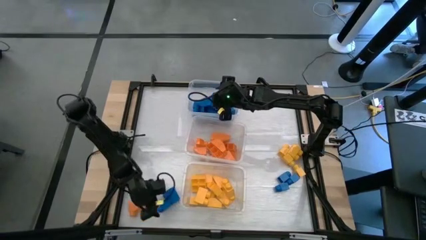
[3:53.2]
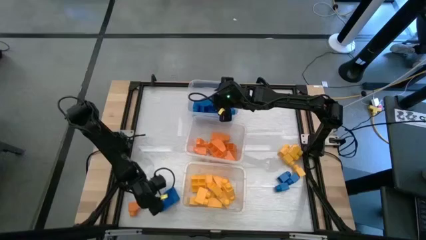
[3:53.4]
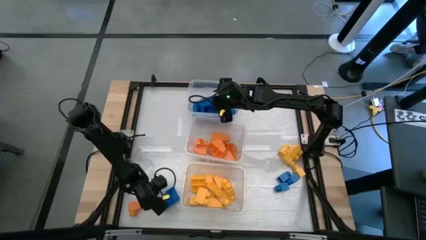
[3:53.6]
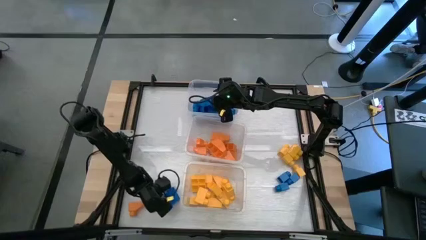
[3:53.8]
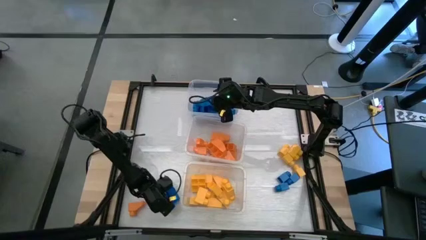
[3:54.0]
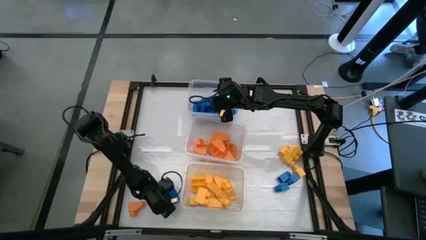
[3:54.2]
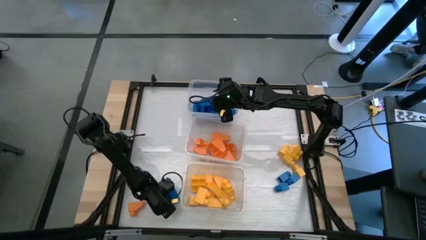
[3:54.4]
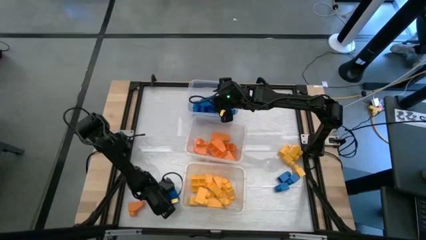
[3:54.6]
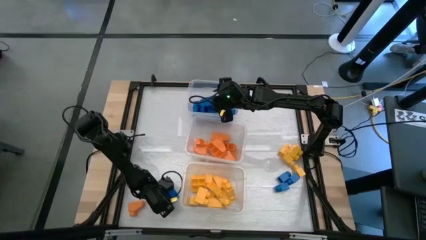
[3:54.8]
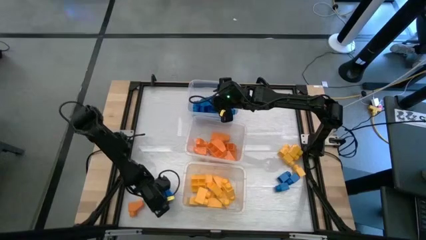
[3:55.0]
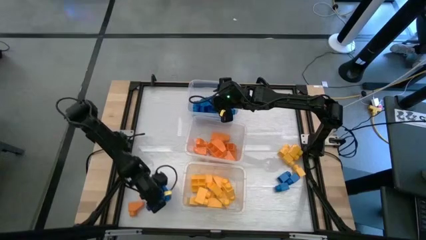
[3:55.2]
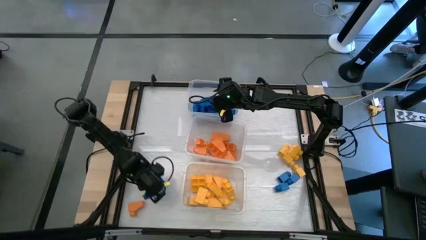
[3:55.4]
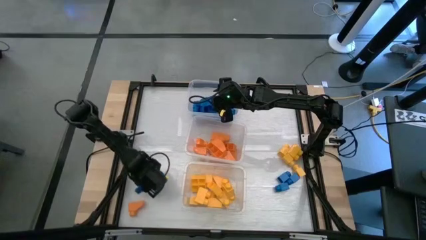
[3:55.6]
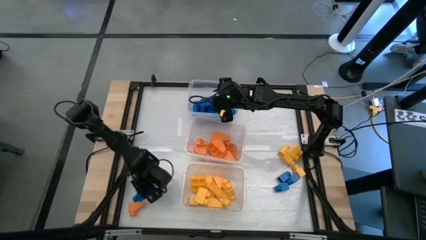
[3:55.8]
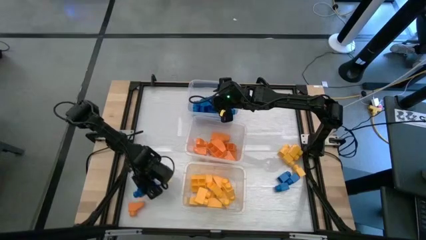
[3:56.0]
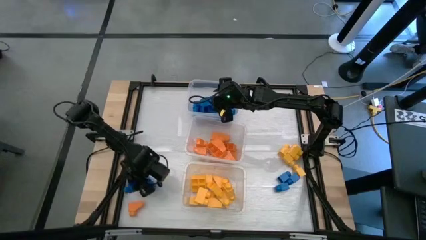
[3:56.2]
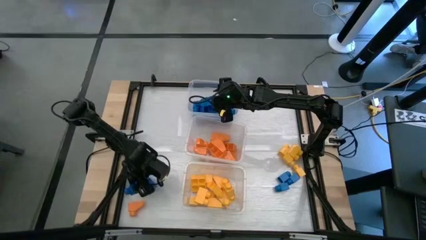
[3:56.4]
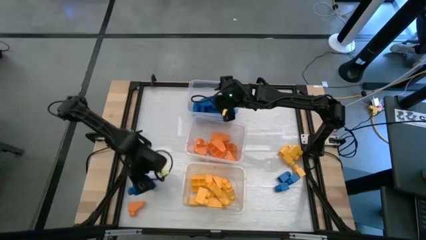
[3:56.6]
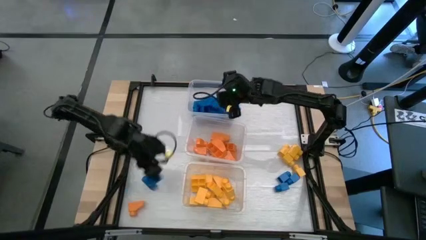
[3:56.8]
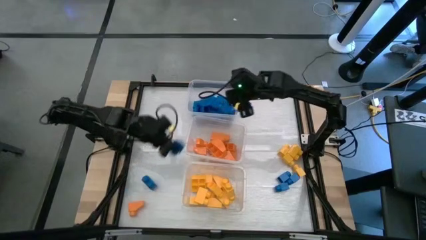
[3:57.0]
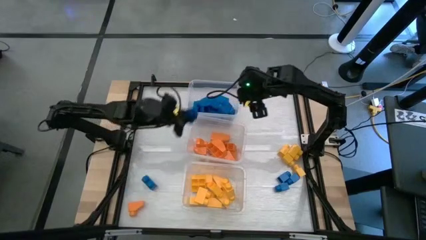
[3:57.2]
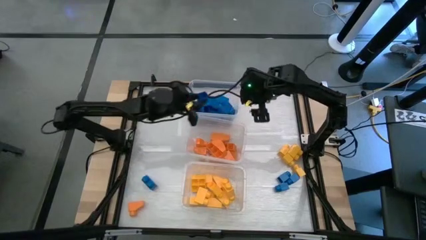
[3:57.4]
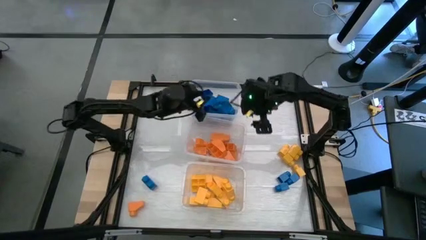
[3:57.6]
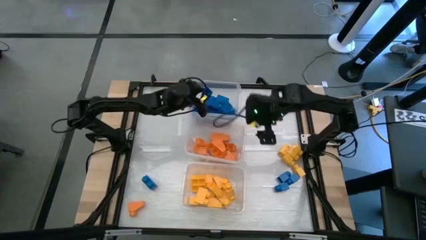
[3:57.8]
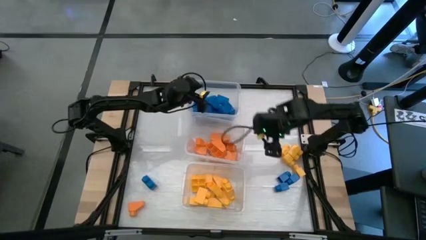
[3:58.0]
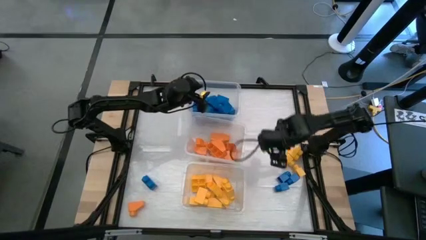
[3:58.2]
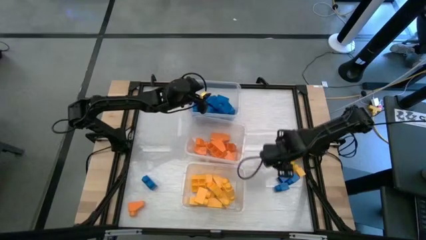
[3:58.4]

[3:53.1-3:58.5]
Task: Sort blocks
Put the blue game piece into the top transparent bin

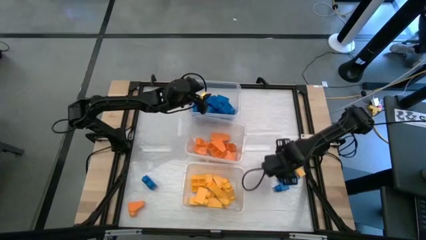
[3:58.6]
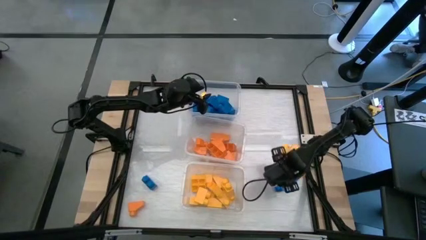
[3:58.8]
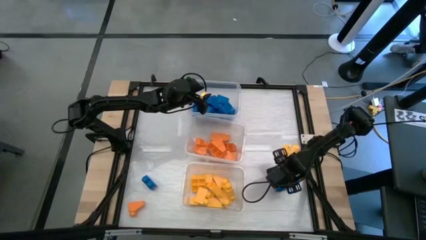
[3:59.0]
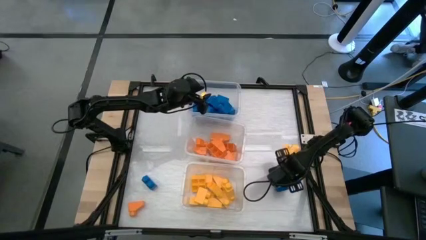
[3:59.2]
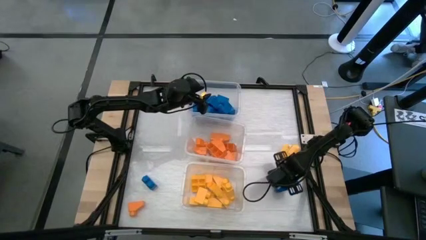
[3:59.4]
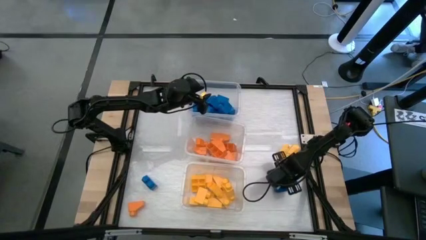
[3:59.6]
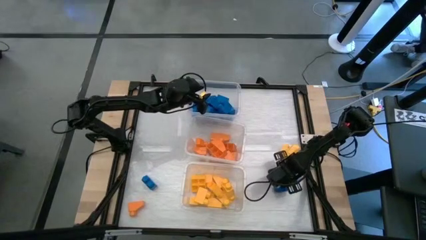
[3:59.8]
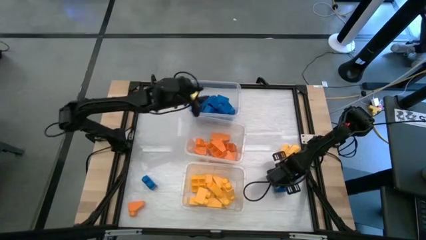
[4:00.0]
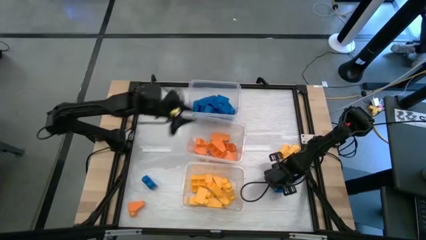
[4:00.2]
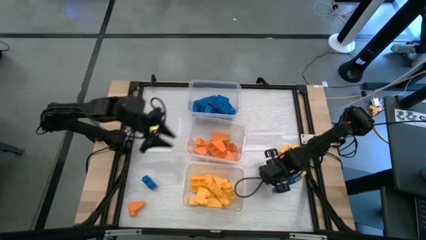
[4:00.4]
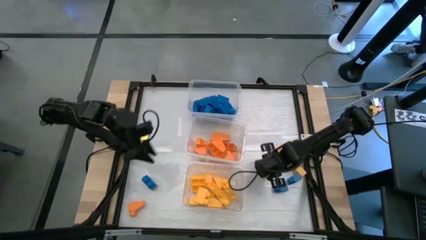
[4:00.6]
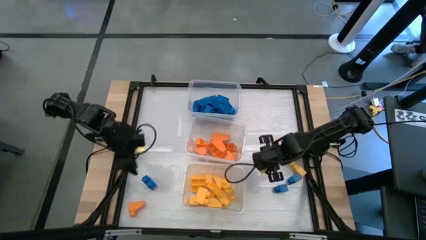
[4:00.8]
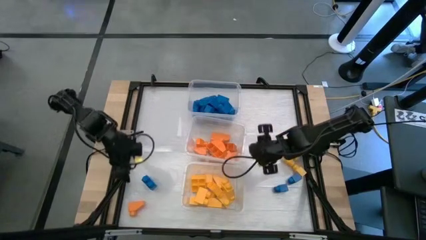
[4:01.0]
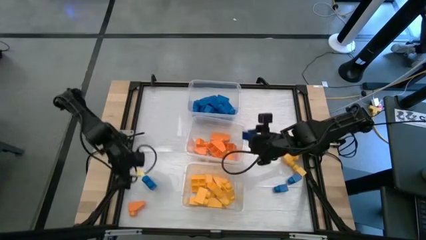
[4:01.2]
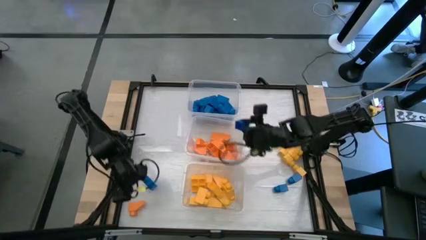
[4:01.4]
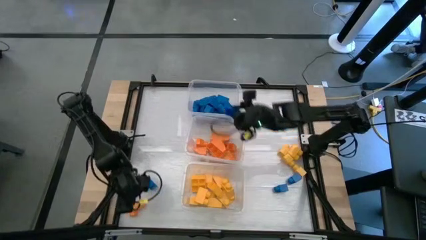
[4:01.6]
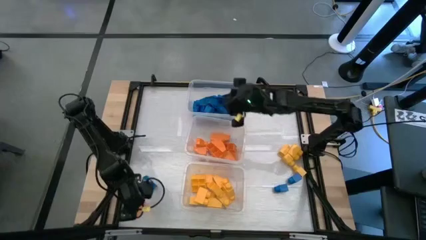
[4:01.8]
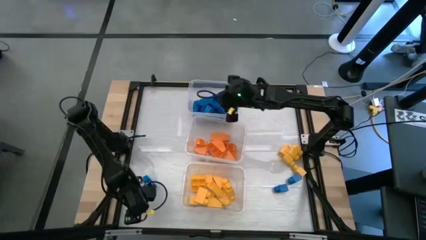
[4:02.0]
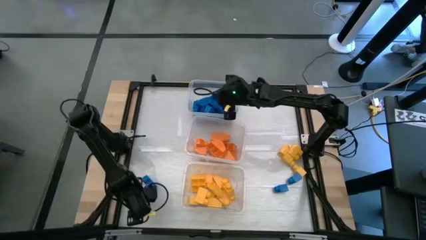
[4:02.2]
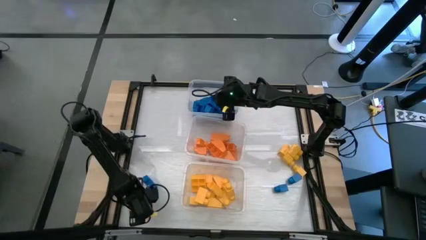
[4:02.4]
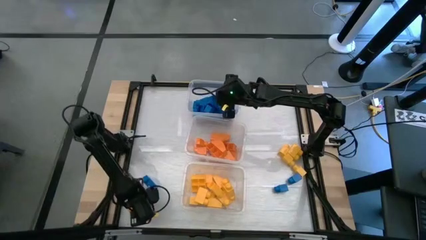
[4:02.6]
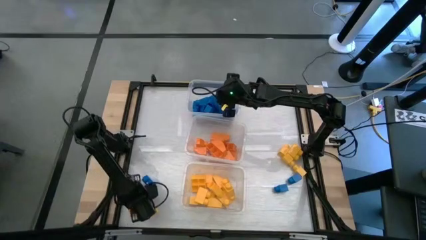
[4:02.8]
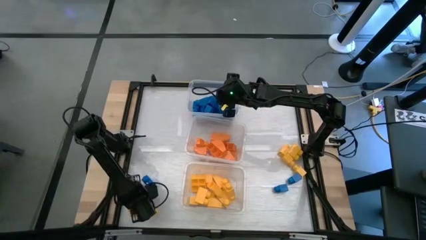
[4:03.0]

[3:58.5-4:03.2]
Put the blue game piece into the top transparent bin

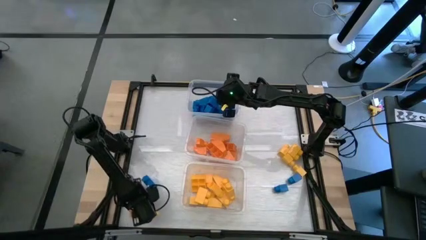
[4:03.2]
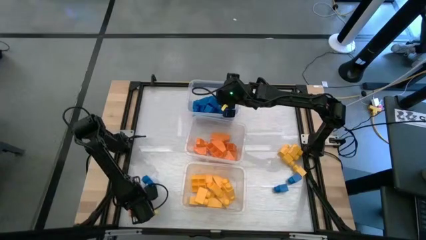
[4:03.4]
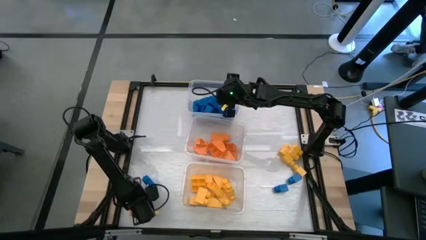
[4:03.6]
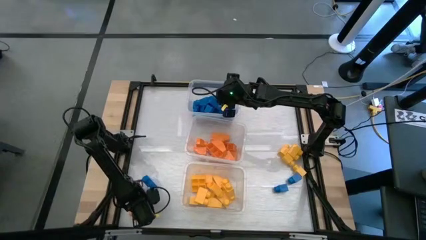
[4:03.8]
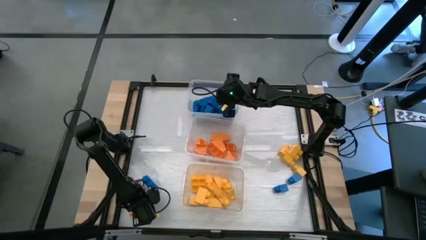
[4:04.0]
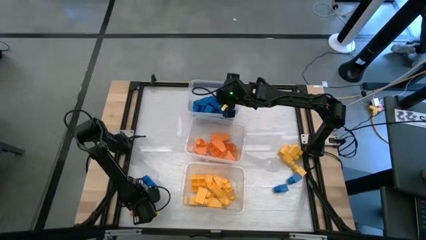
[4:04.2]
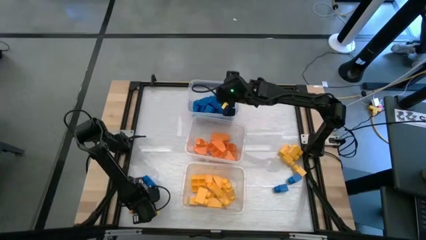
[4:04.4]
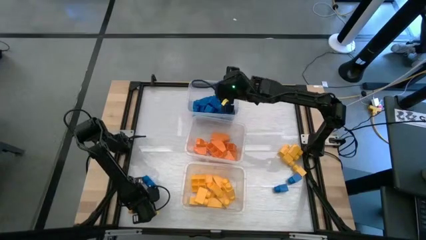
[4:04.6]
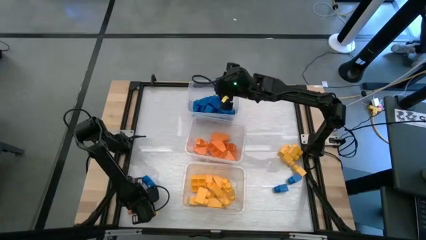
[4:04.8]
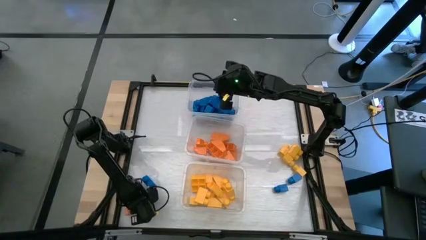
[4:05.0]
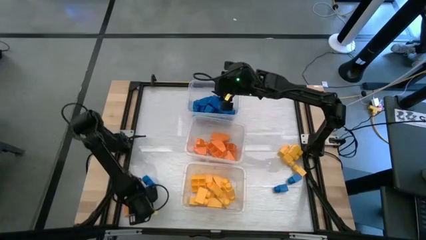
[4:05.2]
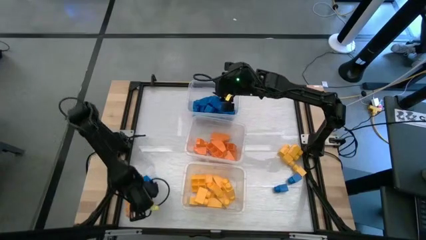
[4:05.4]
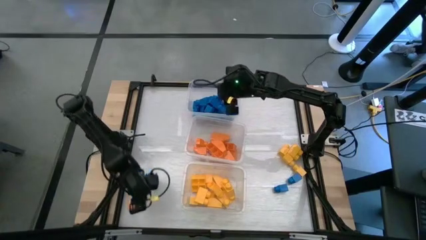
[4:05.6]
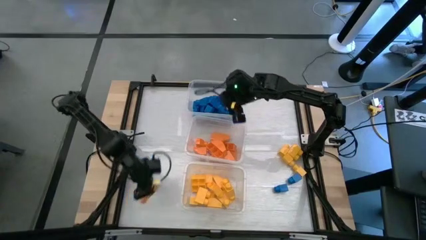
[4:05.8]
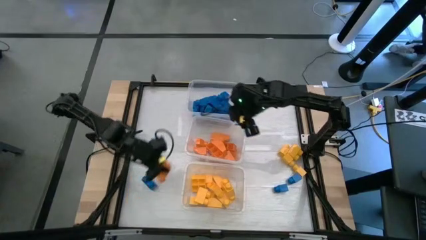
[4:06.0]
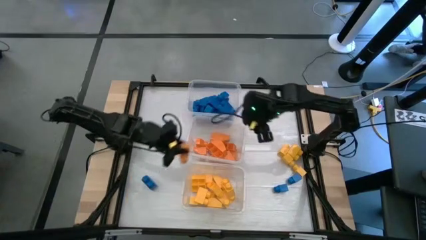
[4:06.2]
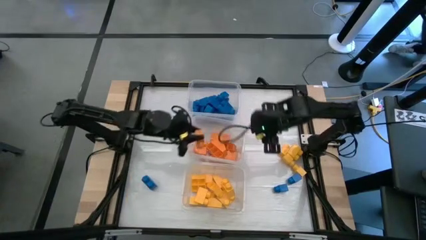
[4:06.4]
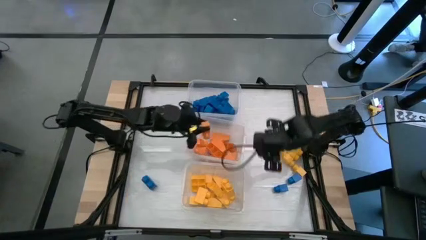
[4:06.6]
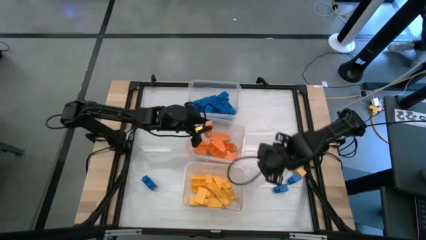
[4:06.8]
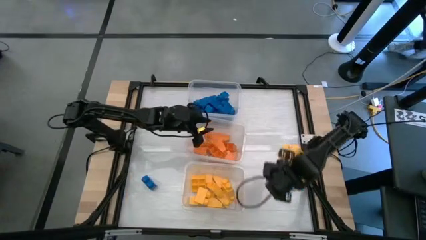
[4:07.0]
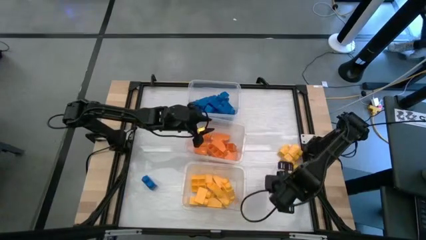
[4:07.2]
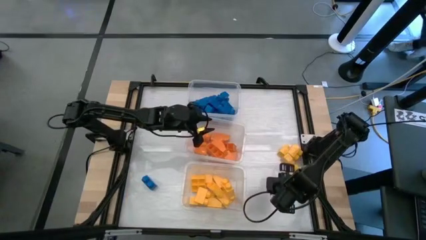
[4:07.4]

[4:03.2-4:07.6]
Put the orange game piece into the middle transparent bin

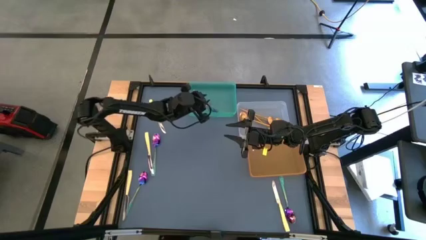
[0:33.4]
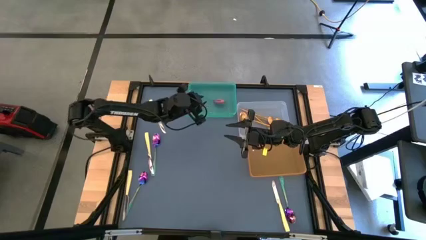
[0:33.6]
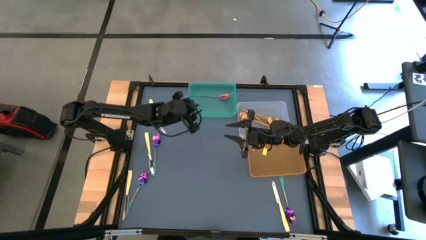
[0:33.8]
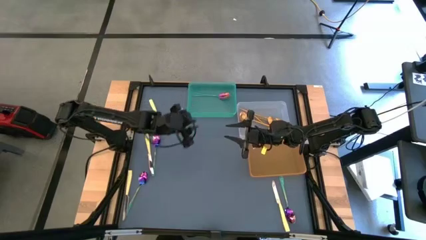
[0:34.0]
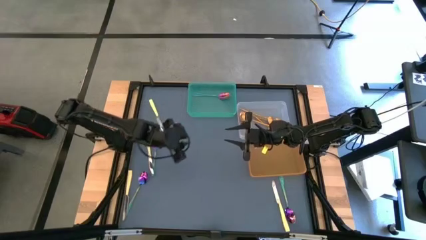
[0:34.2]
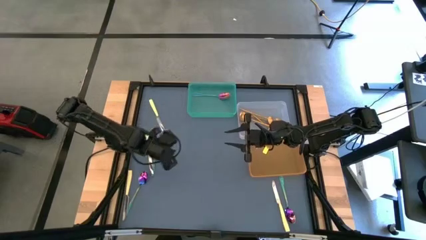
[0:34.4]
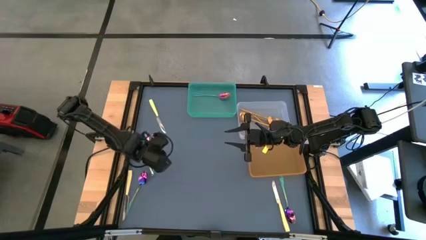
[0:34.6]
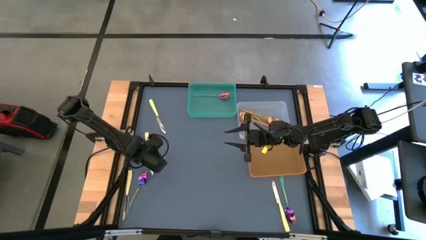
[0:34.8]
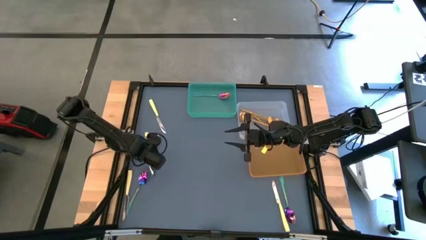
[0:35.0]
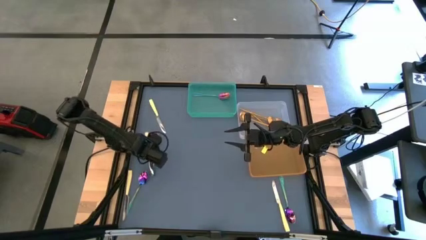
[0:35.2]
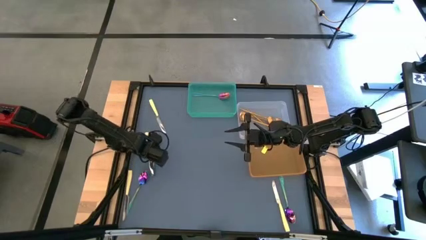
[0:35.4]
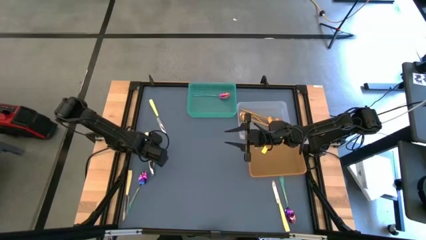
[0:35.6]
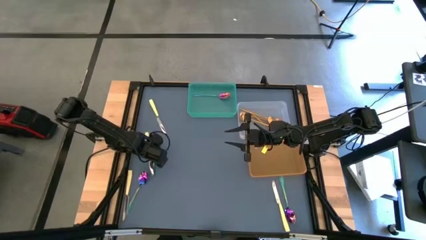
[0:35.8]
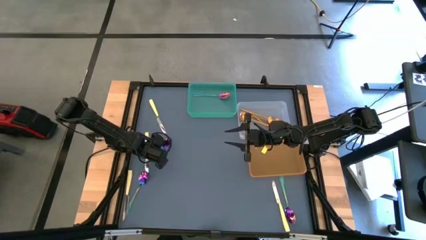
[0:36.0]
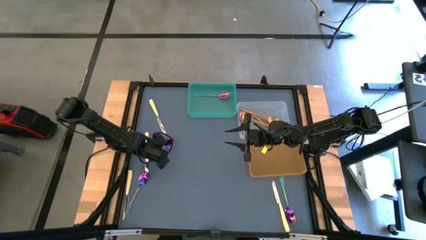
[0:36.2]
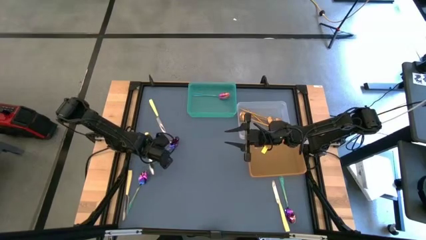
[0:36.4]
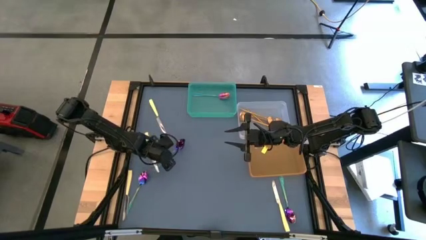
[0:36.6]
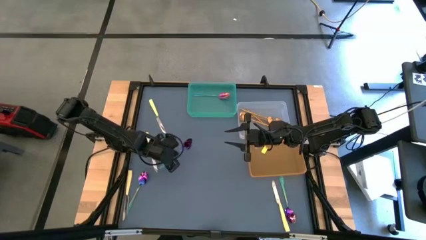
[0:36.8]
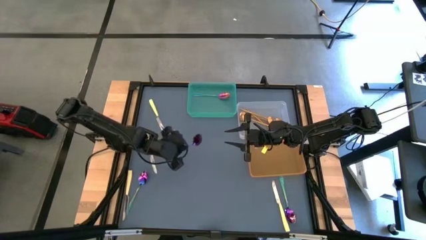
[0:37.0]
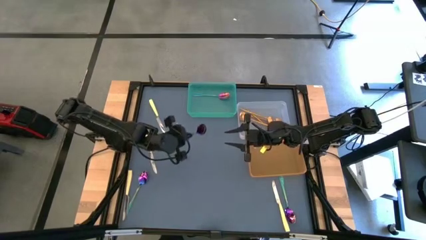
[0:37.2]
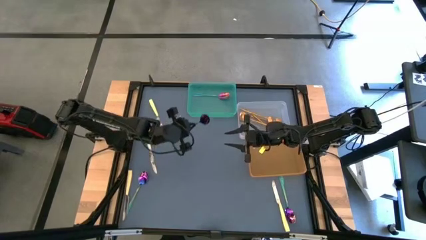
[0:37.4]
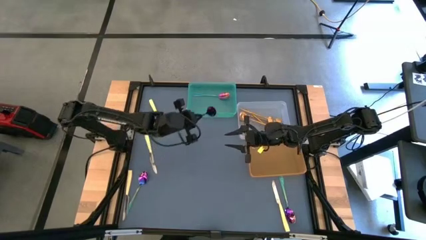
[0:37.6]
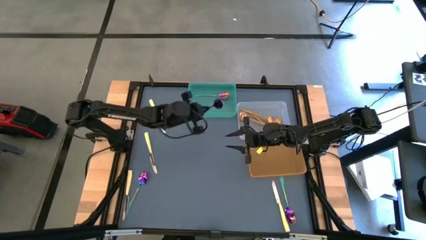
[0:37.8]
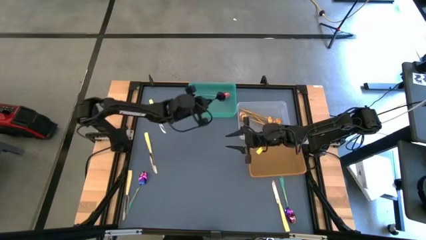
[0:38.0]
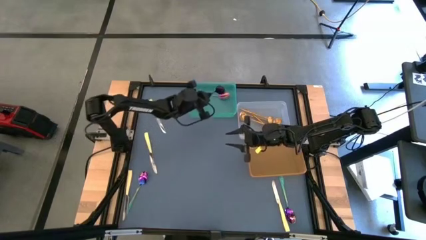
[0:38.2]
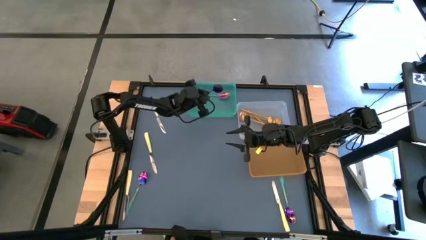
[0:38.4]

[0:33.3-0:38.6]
Task: Sort silverware by color (type)
Put the purple spoon into the green bin
